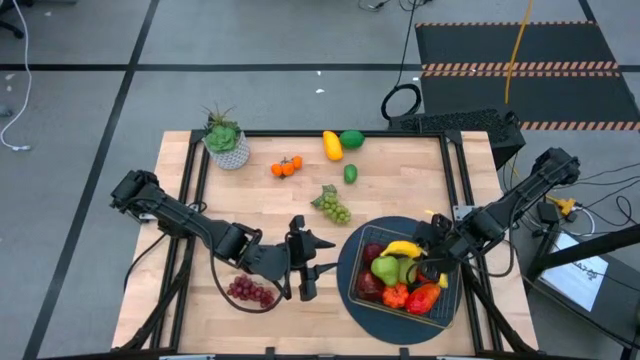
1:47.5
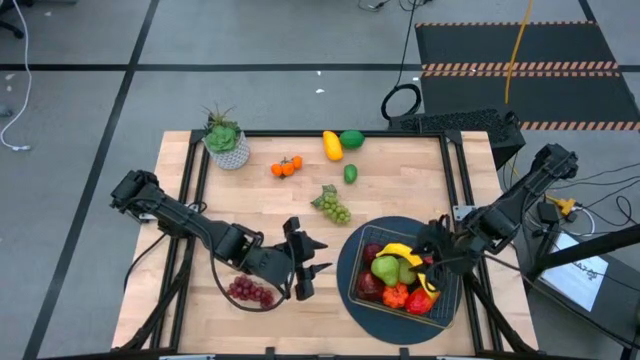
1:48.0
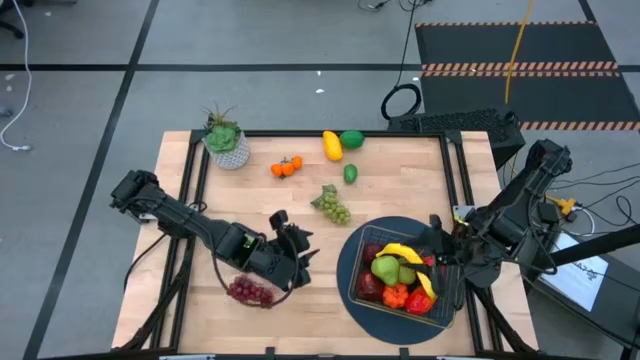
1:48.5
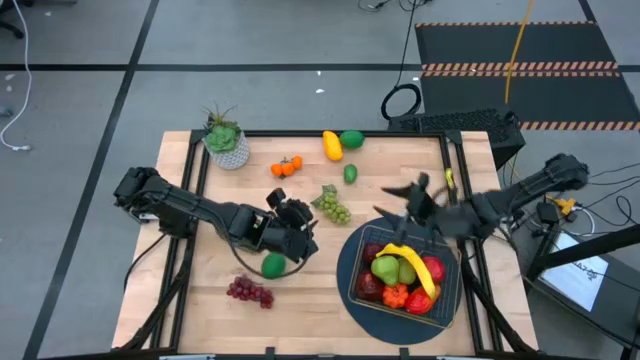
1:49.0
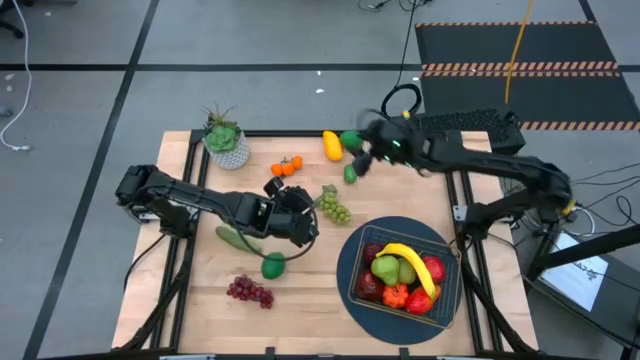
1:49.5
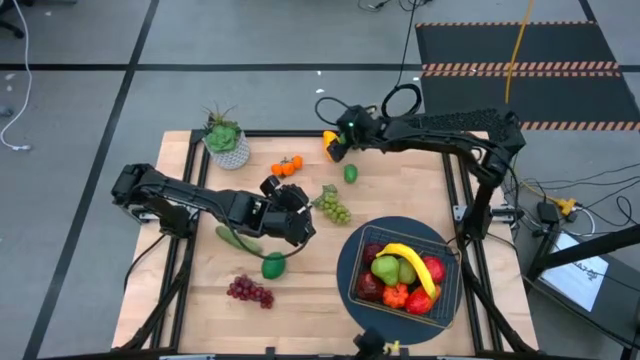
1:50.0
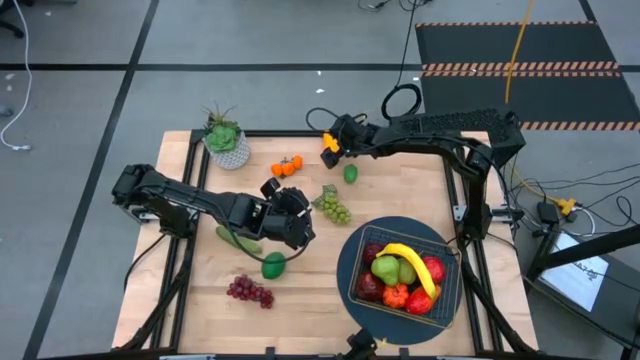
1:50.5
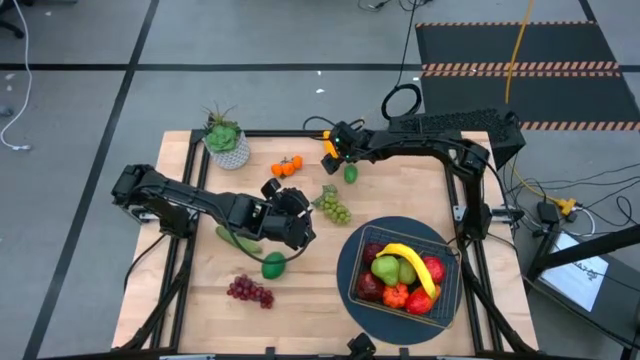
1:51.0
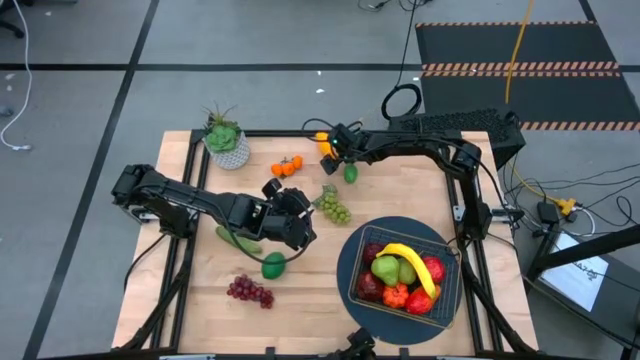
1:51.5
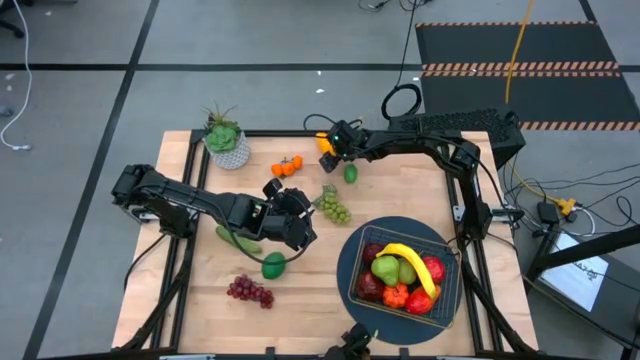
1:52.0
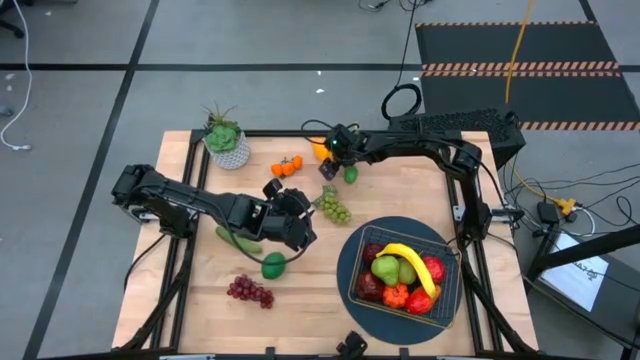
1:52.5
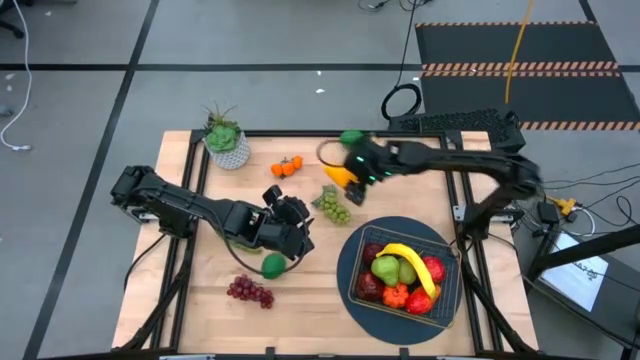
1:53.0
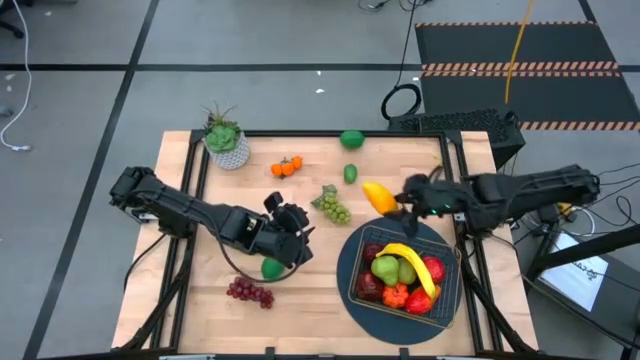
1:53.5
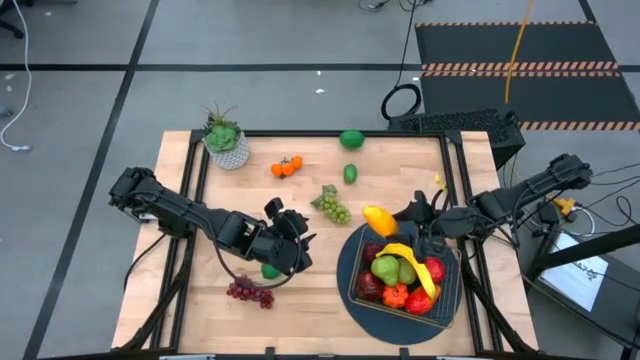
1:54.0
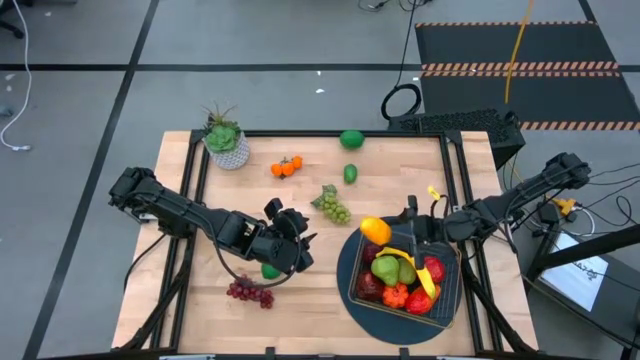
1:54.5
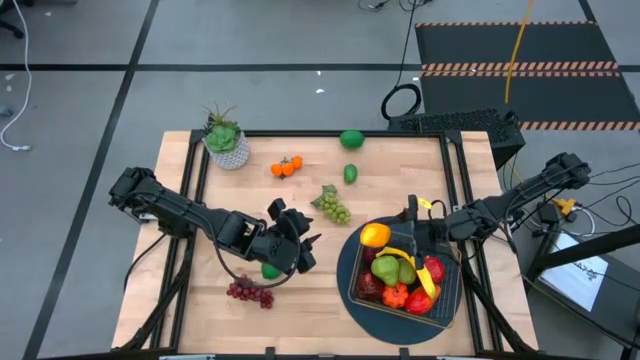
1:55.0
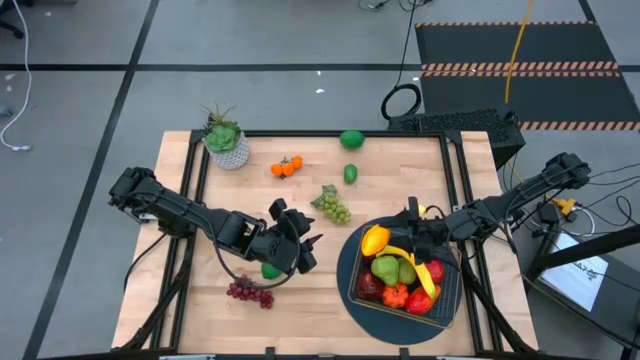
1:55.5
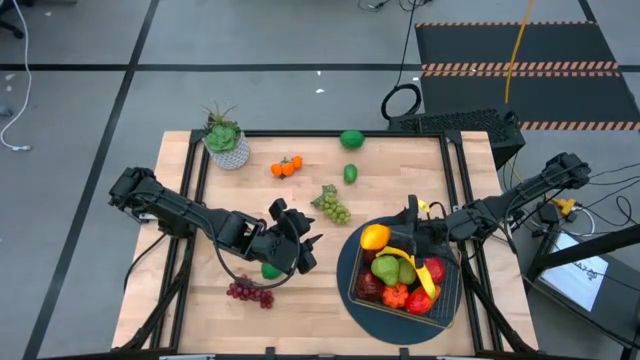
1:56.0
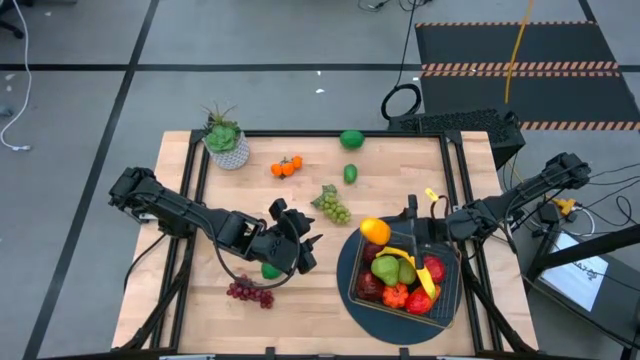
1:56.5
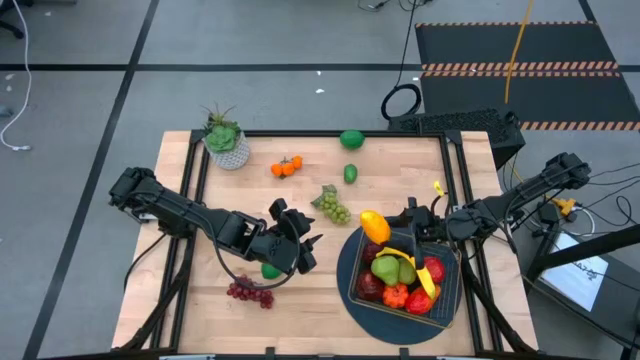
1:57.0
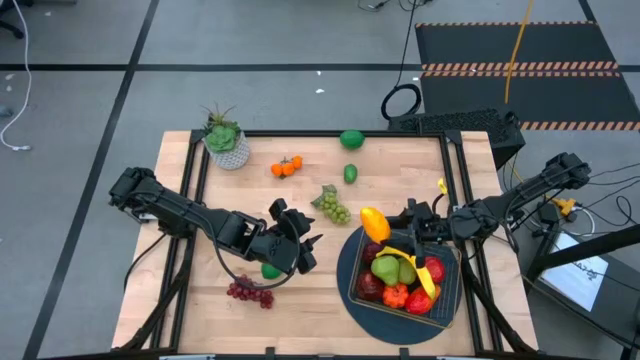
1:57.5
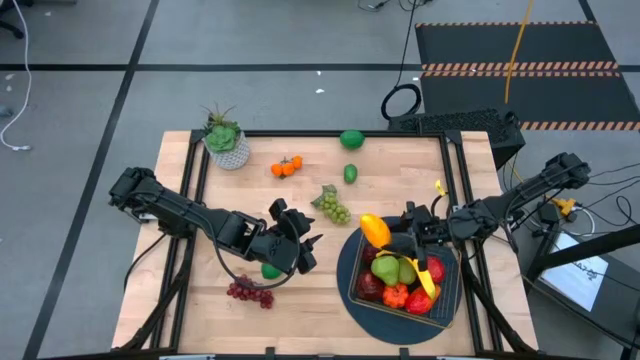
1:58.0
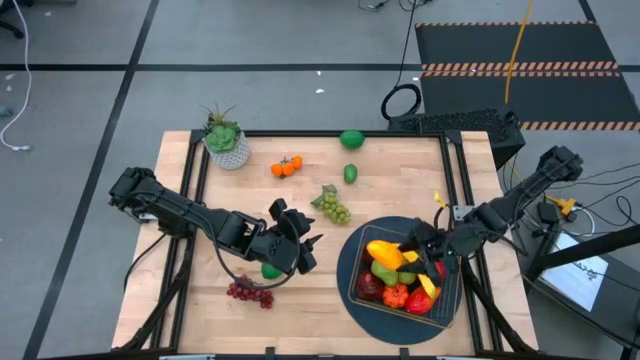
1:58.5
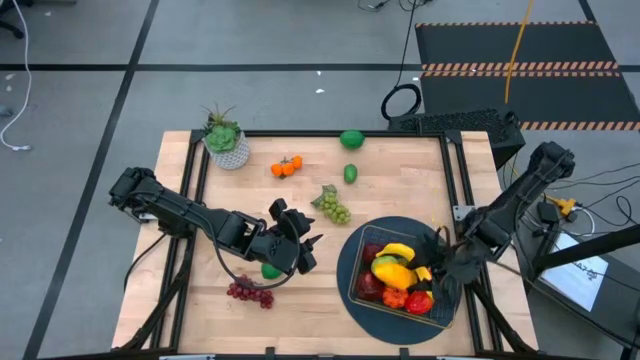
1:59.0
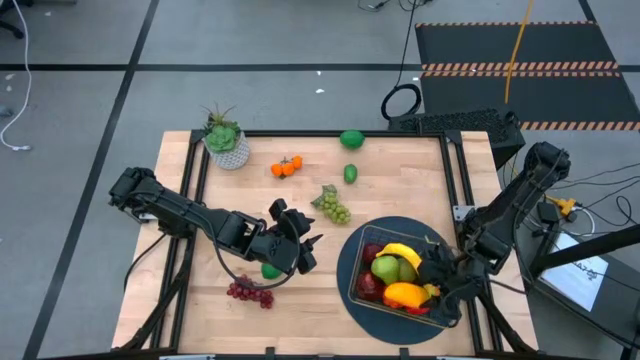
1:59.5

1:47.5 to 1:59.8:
Task: Build produce basket
Put the mango into the gold wire basket

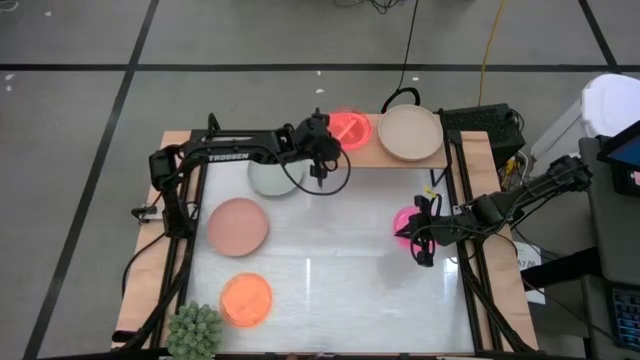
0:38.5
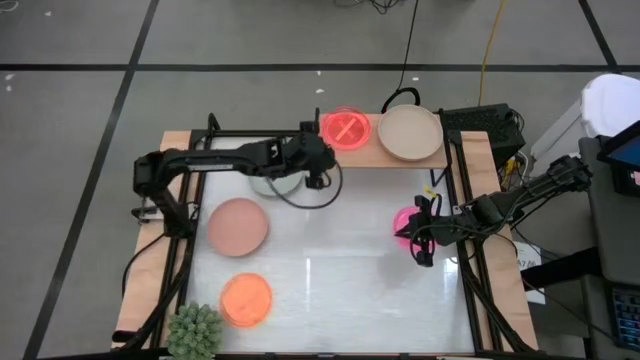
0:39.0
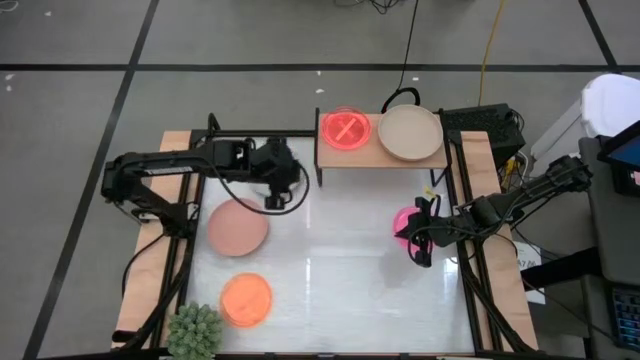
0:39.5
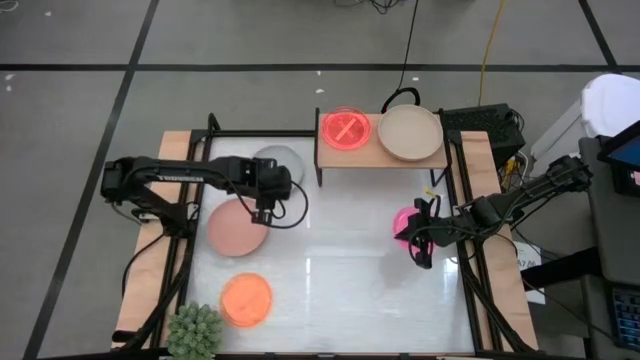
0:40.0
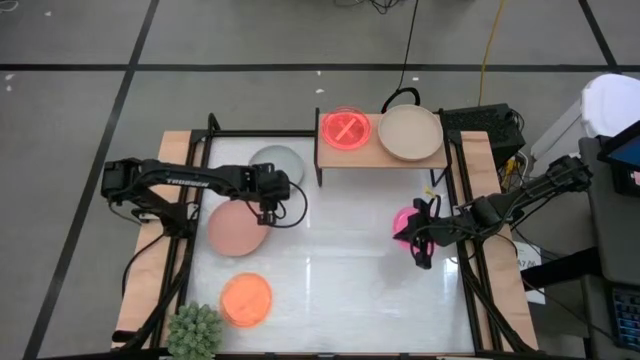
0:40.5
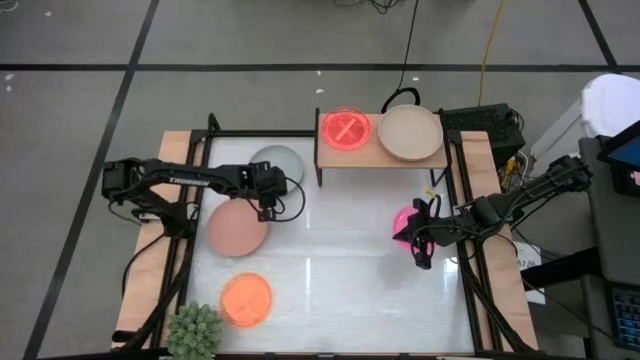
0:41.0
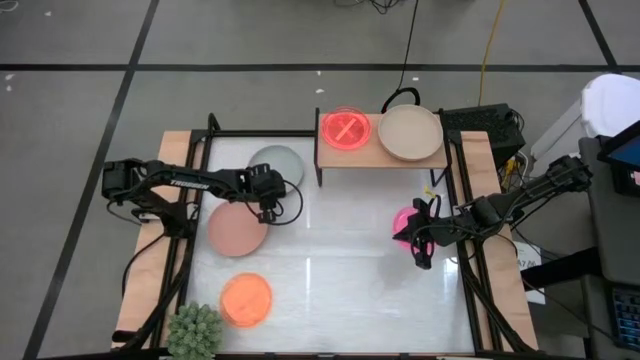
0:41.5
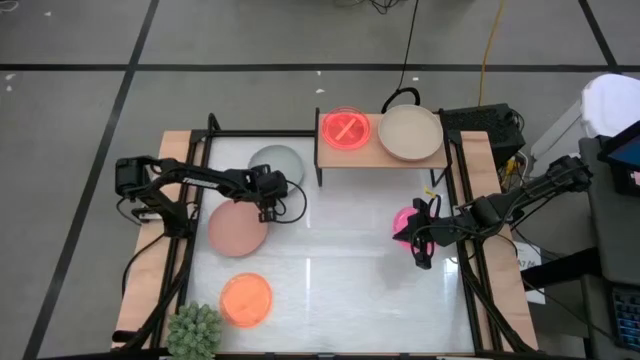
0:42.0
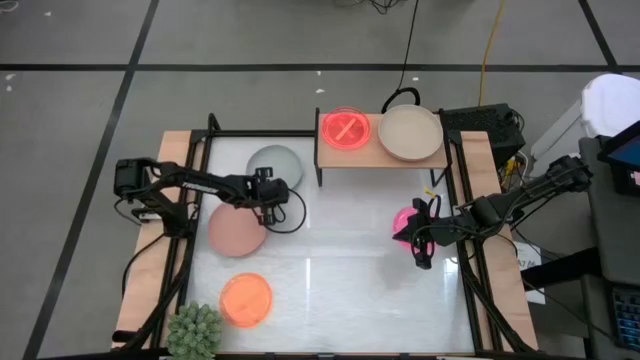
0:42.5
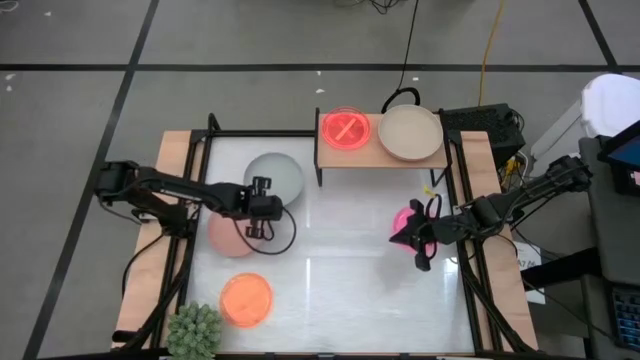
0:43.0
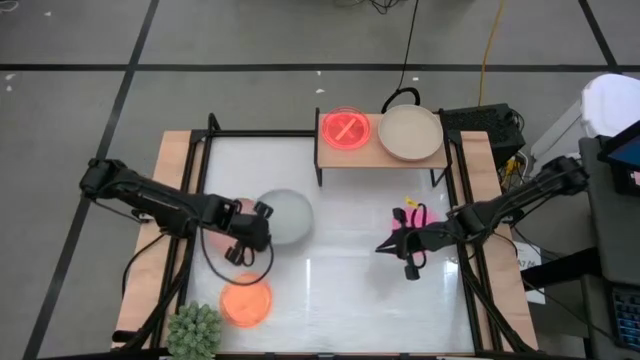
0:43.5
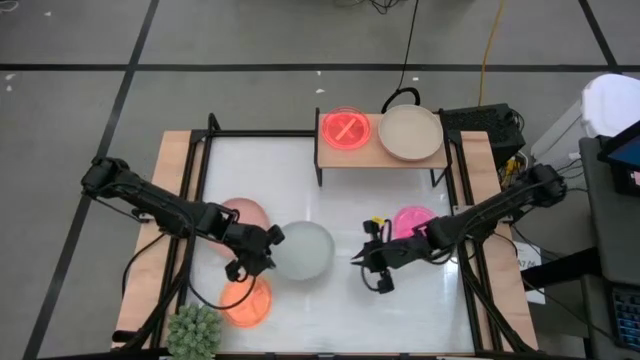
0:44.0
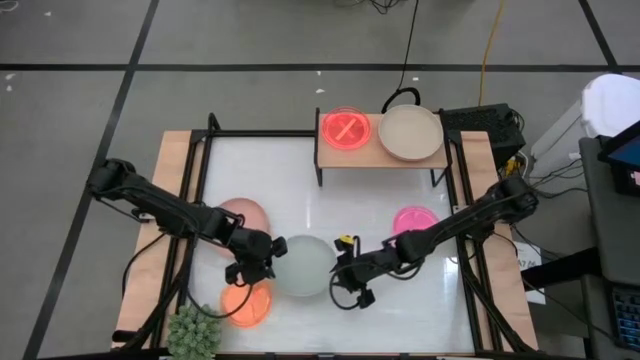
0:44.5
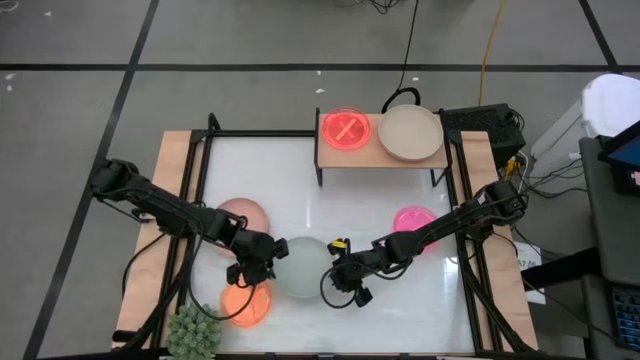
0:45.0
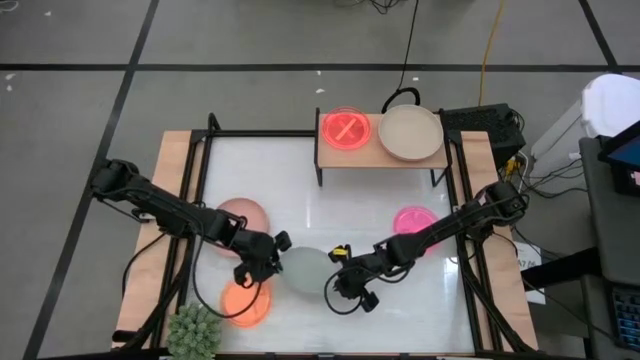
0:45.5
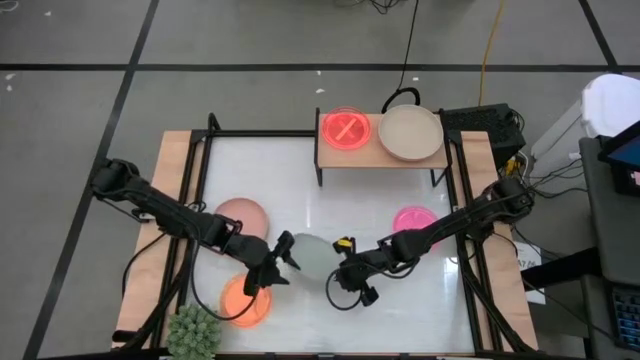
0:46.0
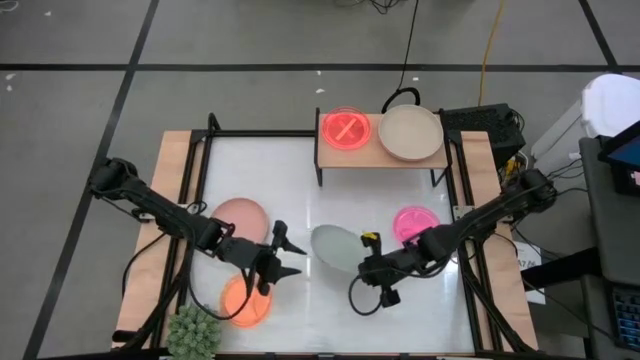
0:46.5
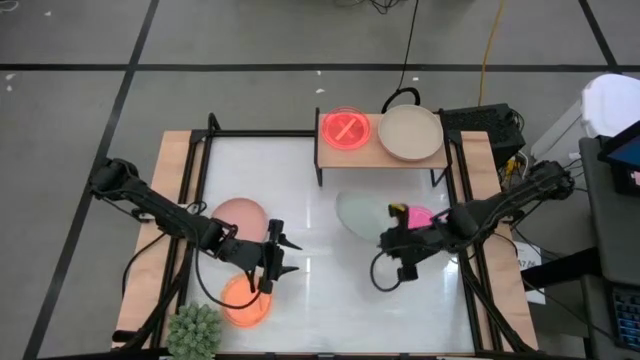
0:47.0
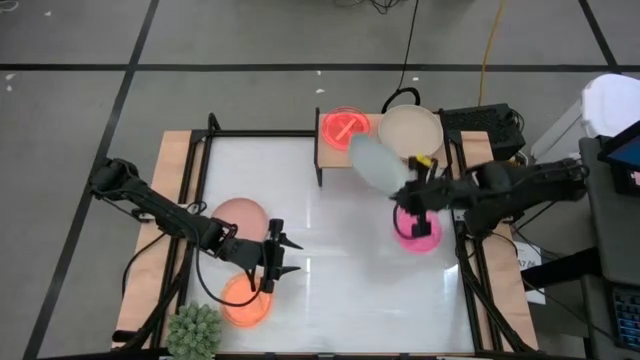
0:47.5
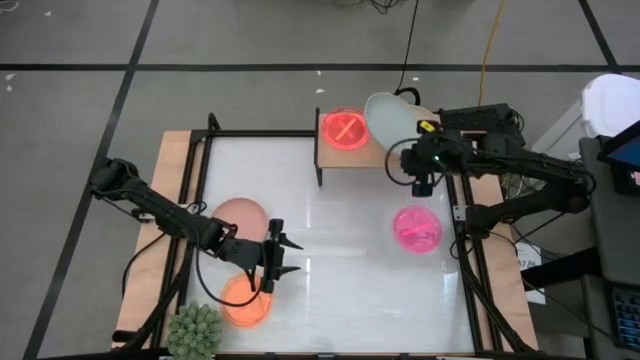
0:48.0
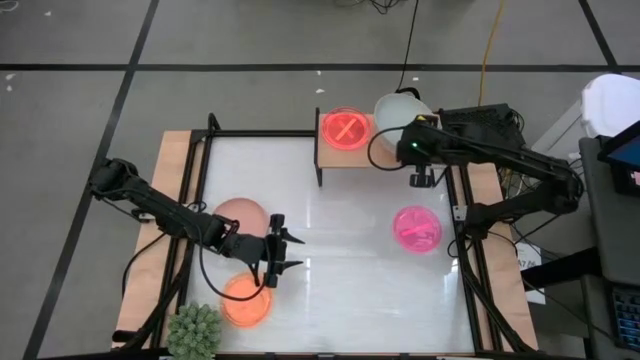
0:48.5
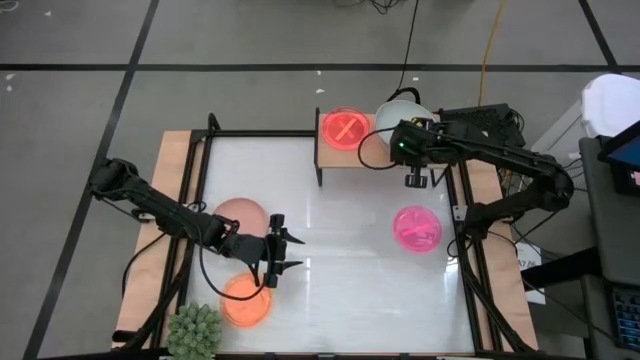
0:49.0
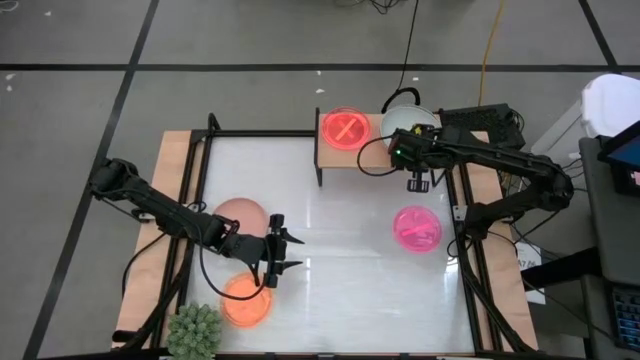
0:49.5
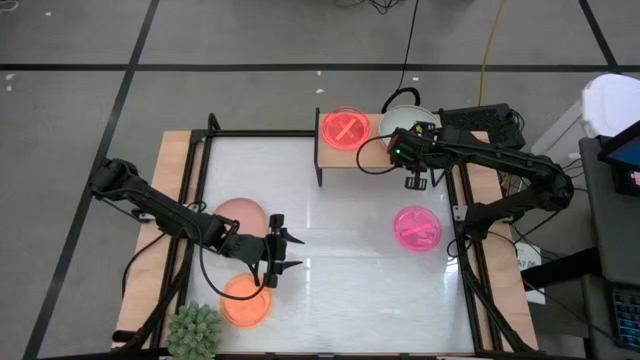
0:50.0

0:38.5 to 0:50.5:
Task: Place and stack plates onto a shelf
Stack the gray plate on top of the light brown plate on the shelf
